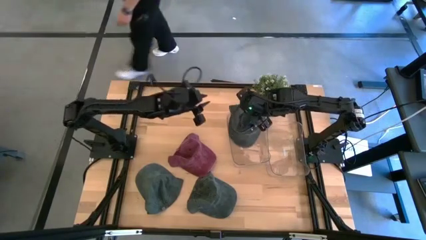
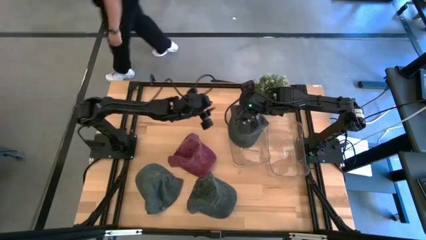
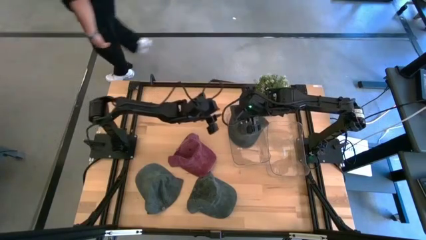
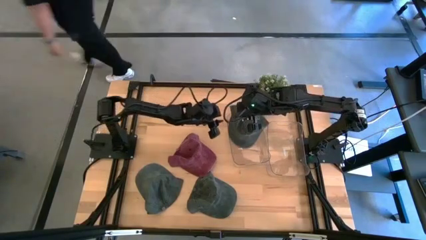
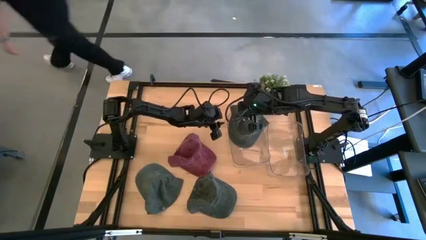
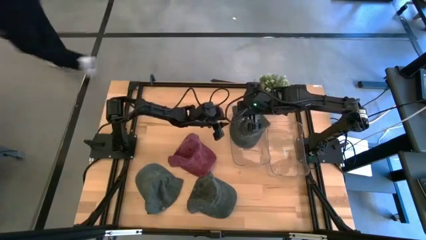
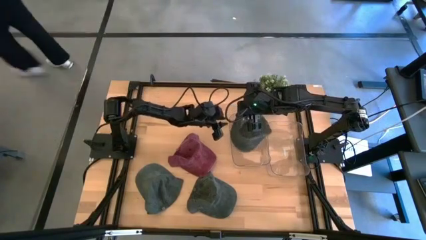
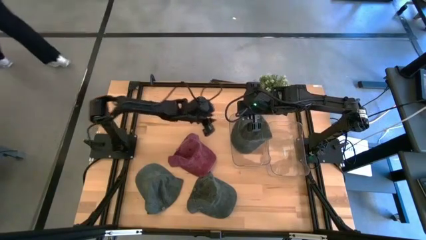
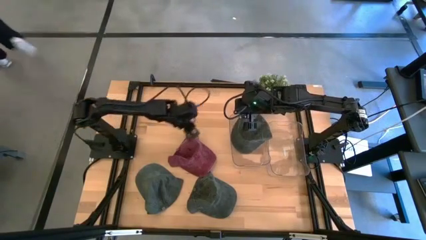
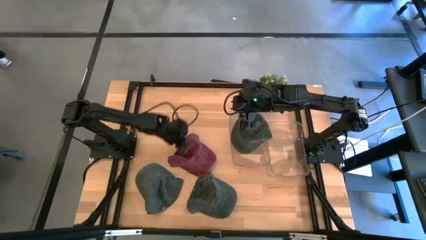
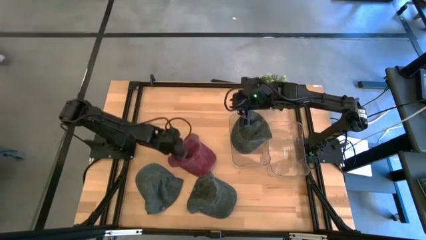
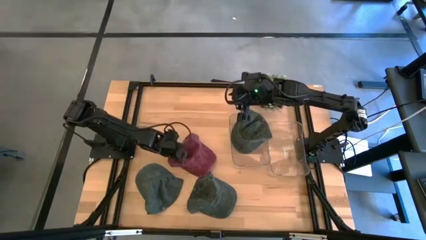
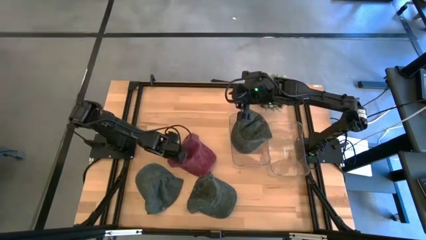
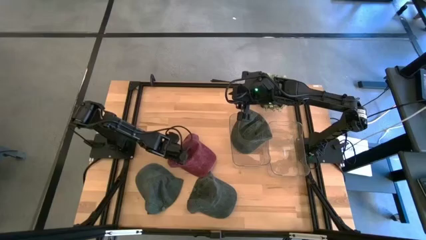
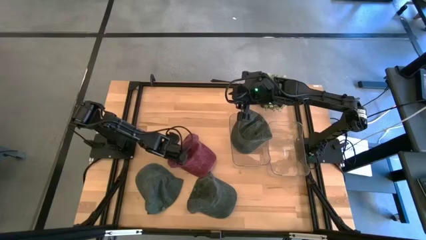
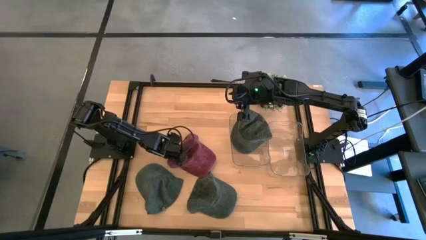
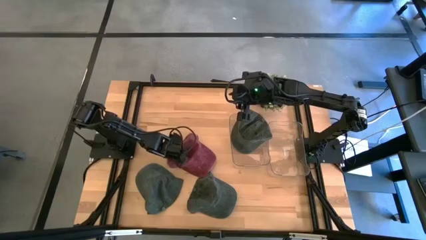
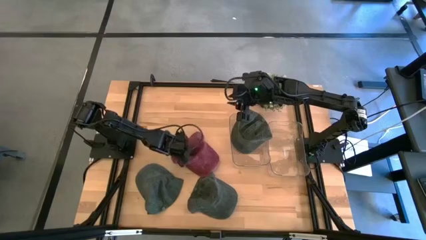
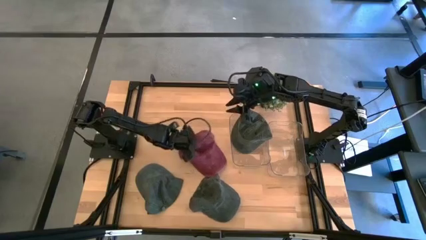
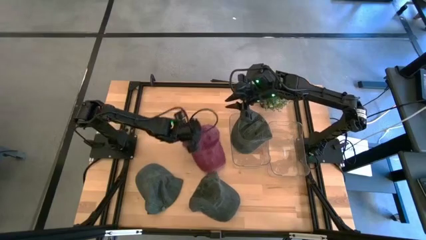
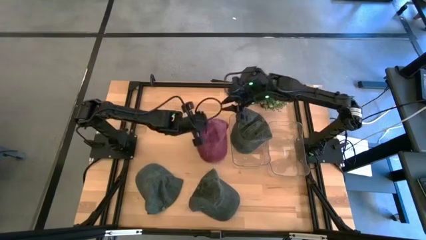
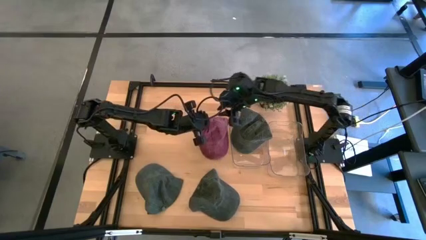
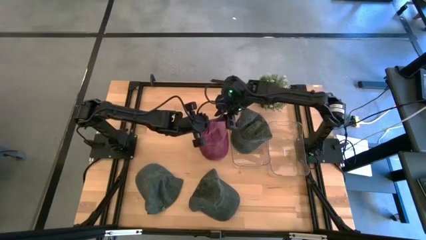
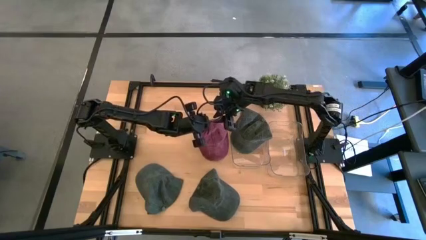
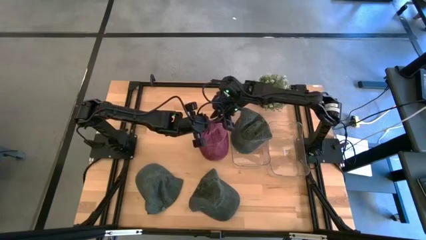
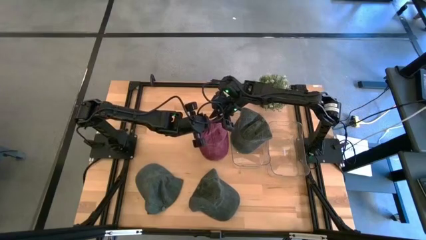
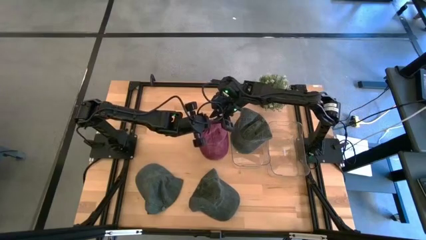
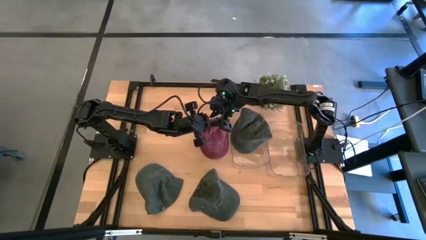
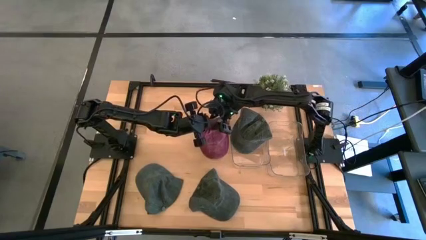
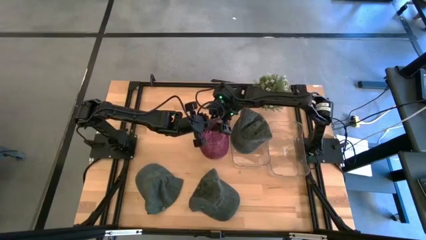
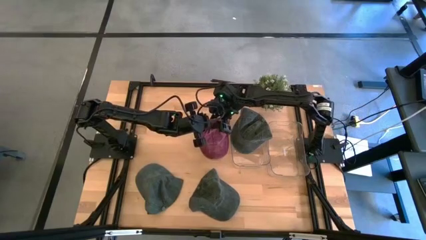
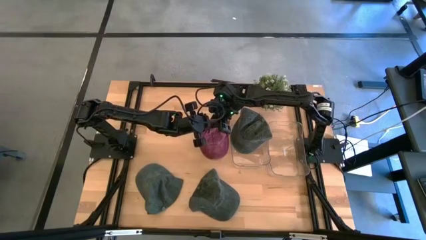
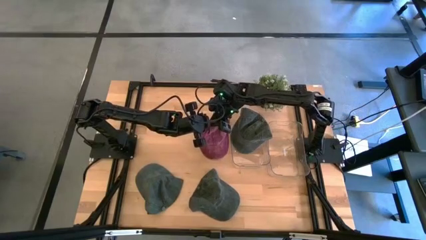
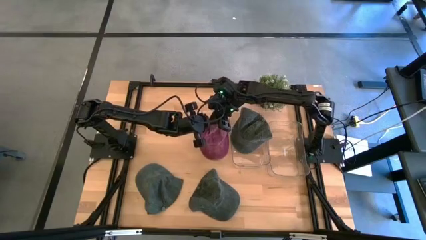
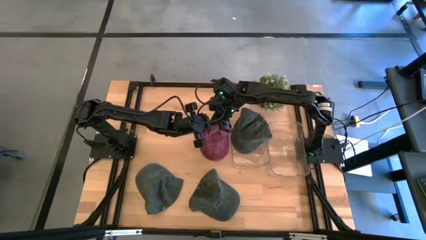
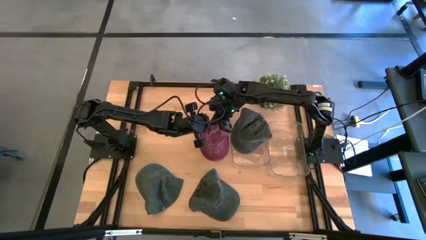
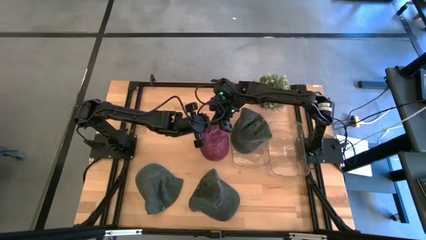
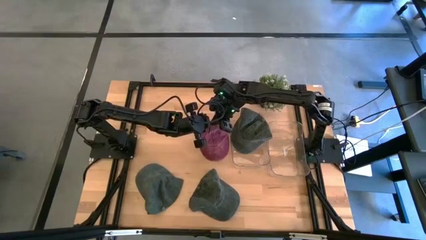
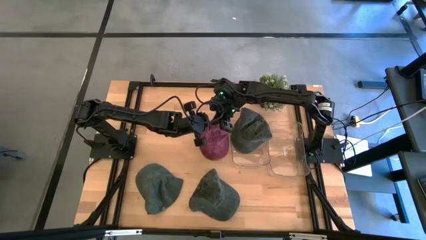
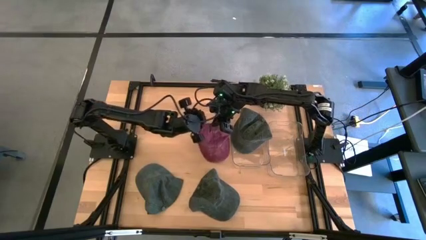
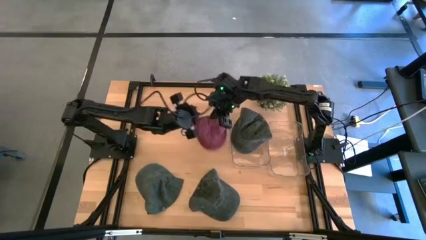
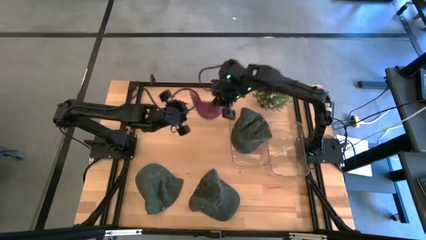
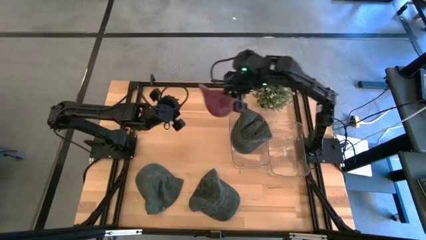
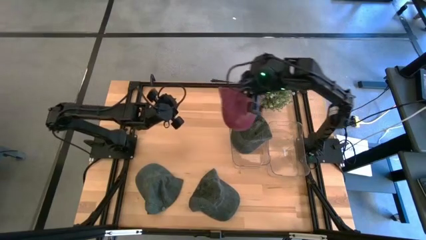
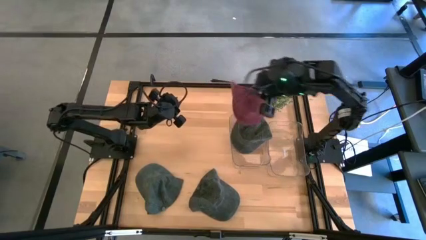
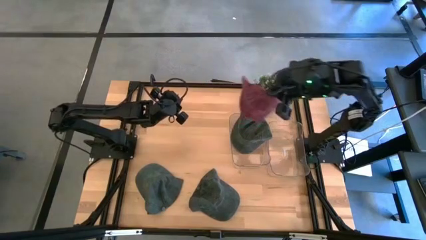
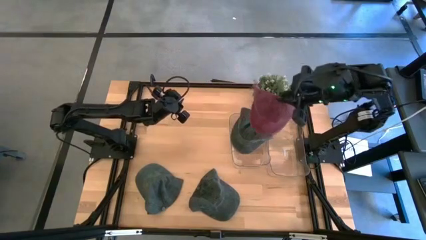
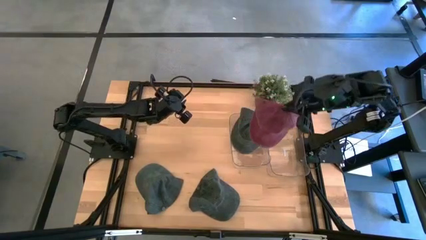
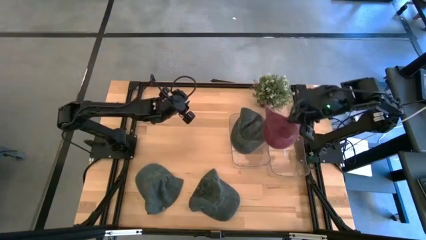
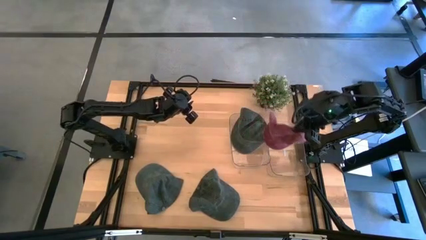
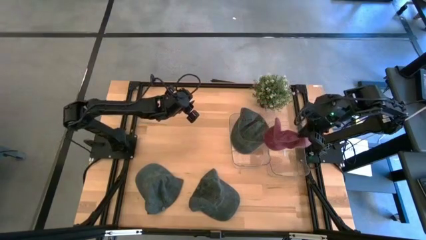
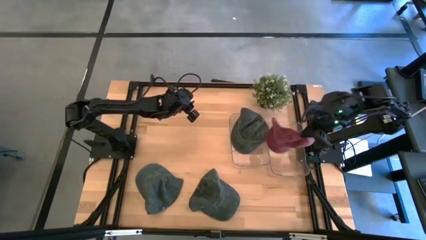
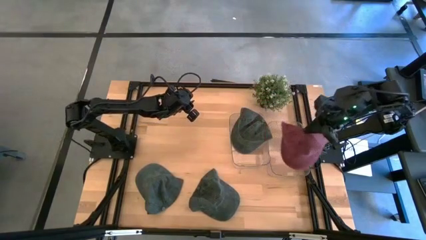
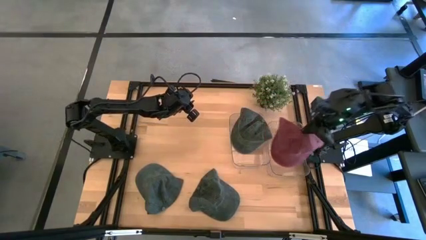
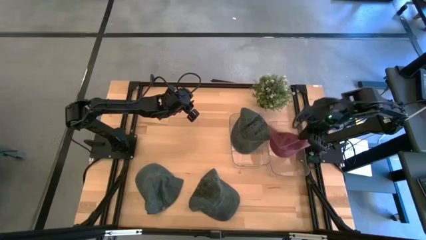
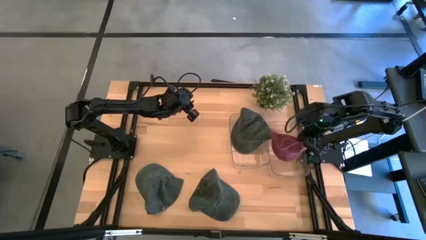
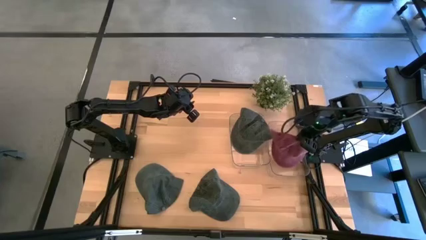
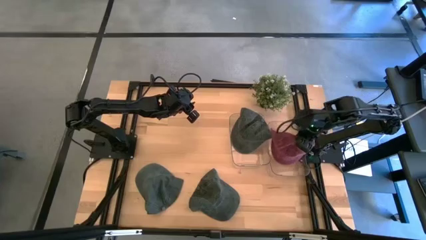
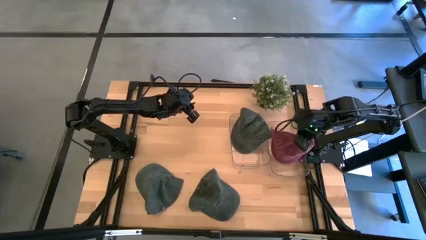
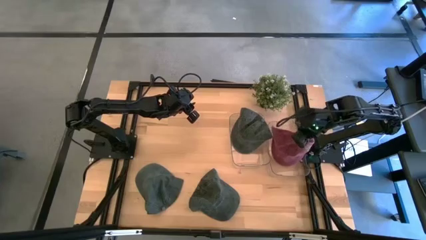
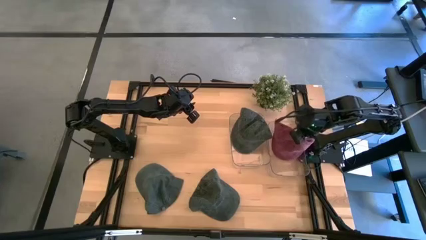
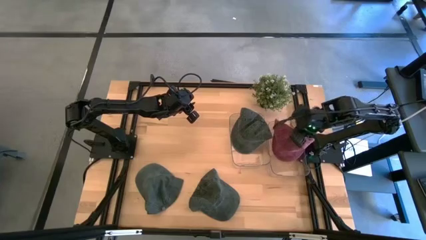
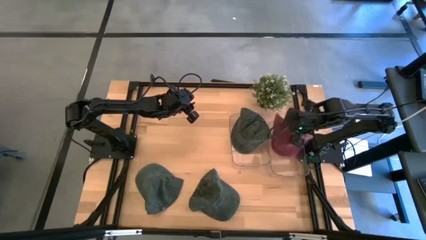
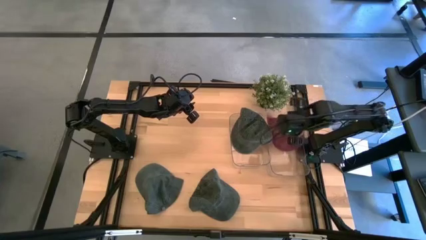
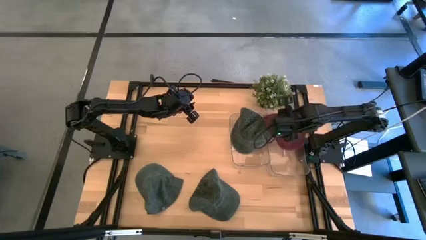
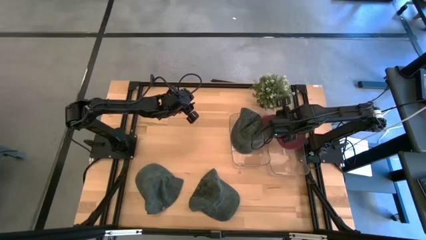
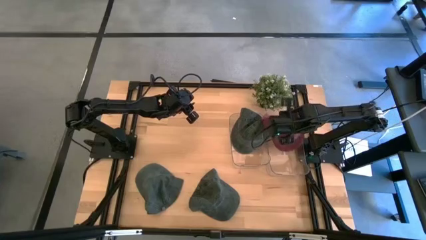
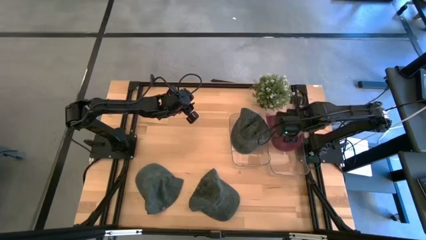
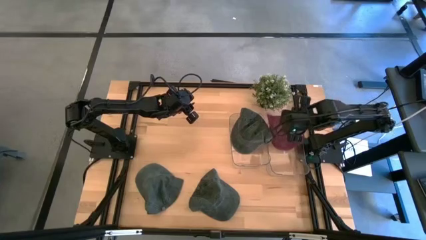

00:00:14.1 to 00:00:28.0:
Task: Pick & Place hat
Put the red cap into the right transparent bin

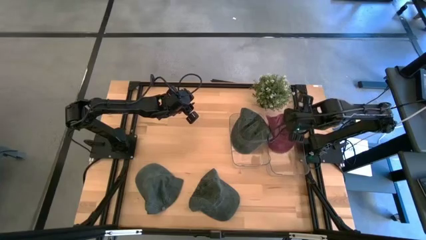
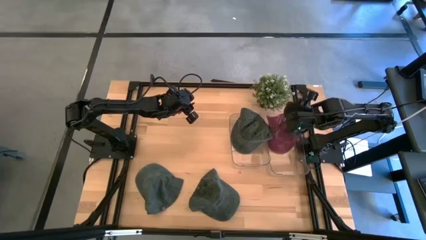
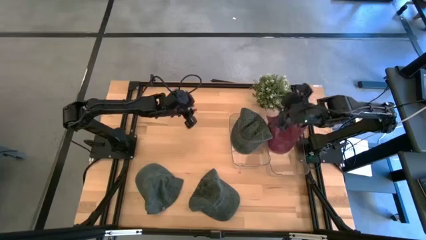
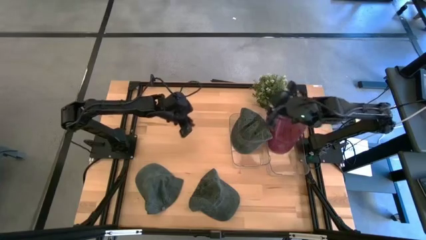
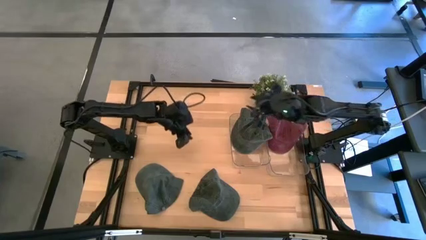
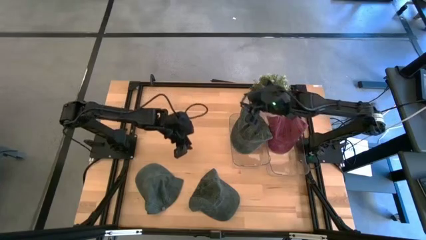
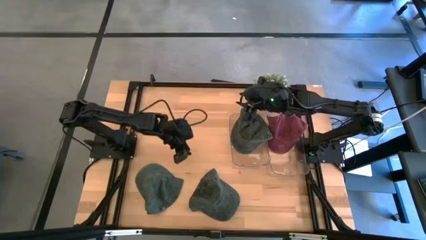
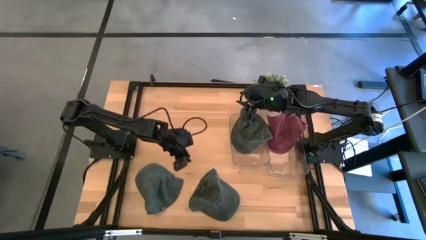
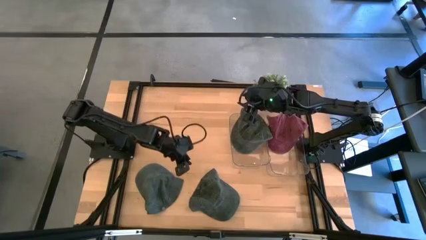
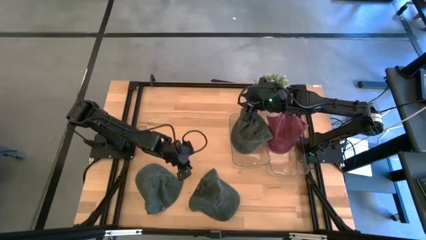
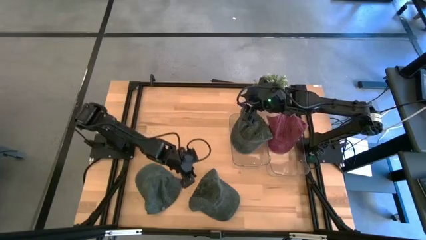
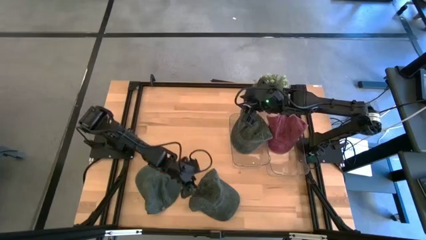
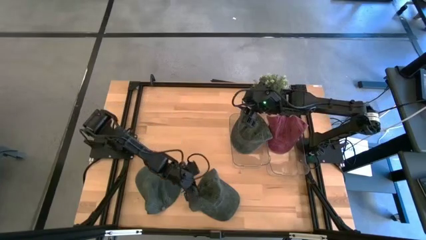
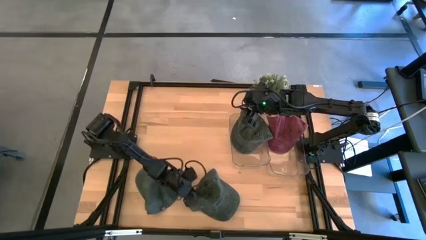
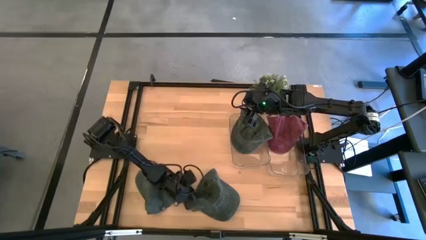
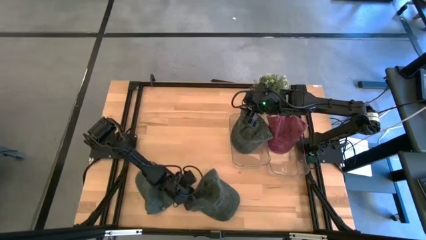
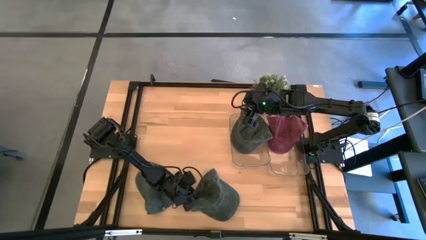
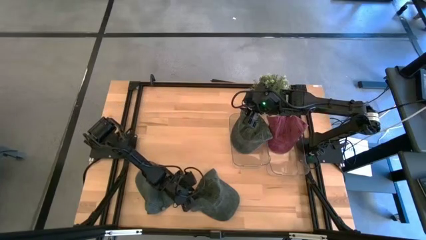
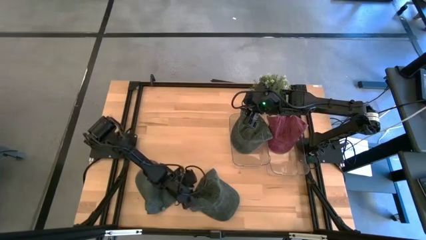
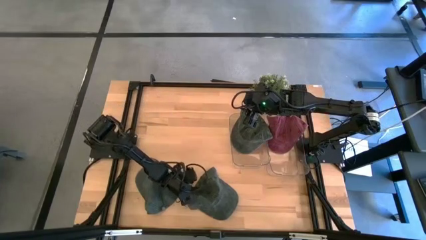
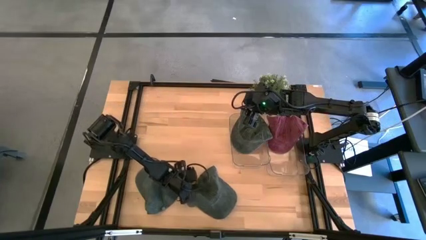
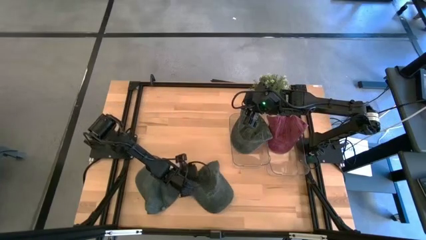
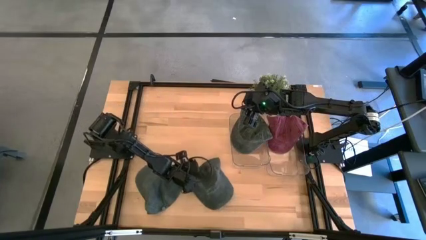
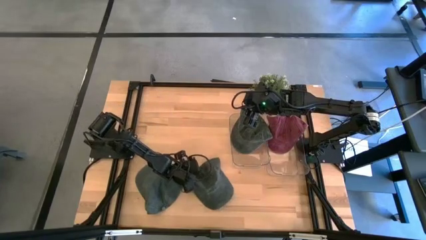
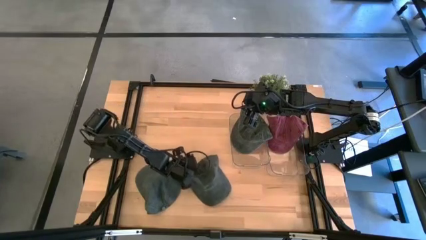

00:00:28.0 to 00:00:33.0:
Put the right black cap into the left transparent bin
